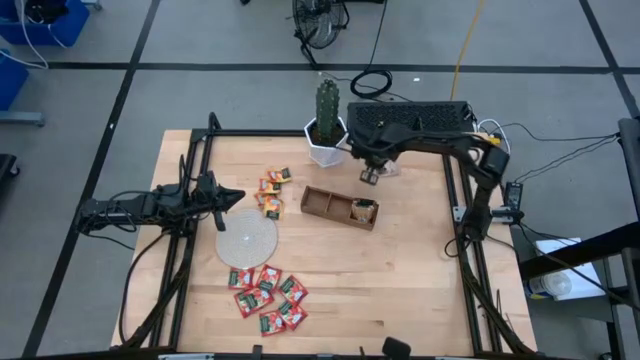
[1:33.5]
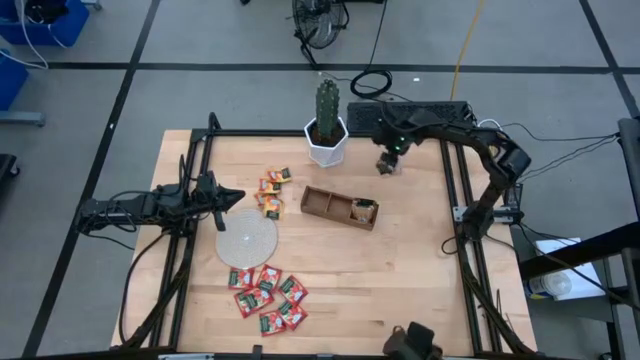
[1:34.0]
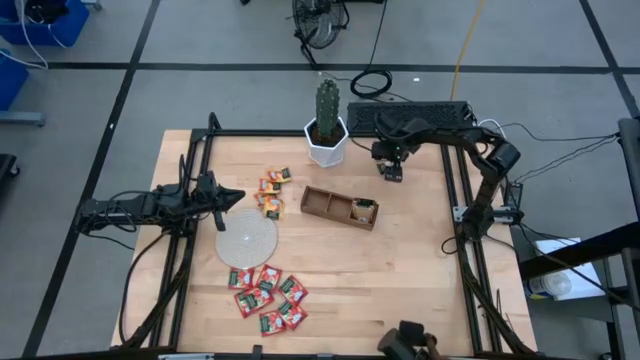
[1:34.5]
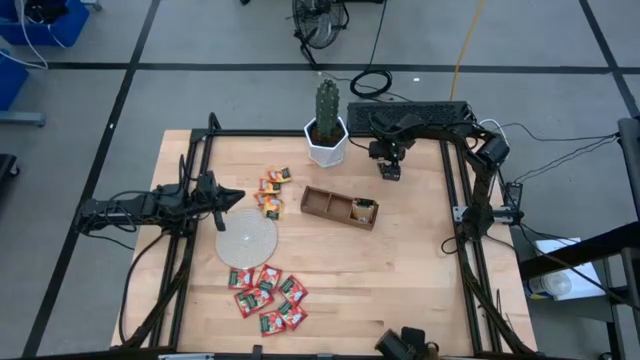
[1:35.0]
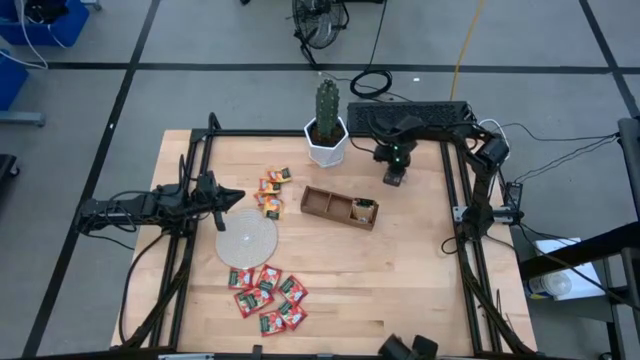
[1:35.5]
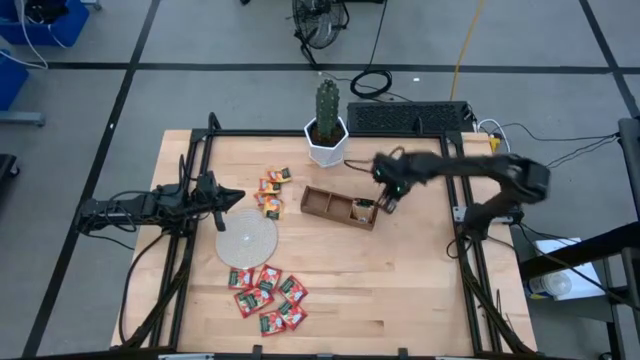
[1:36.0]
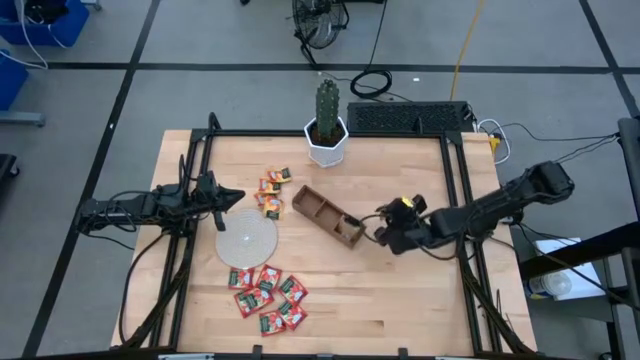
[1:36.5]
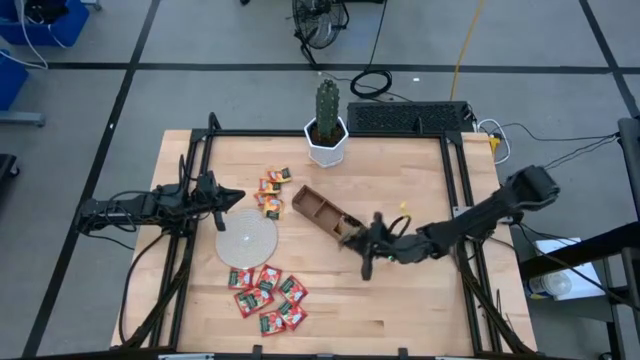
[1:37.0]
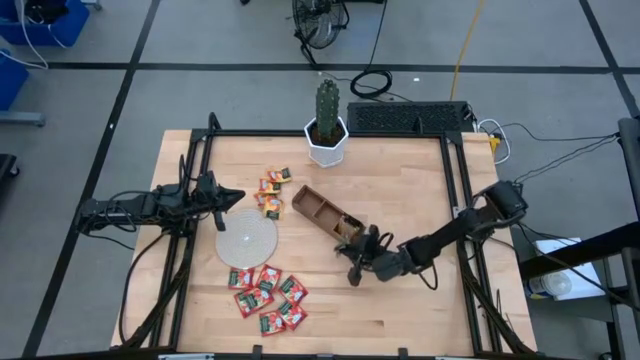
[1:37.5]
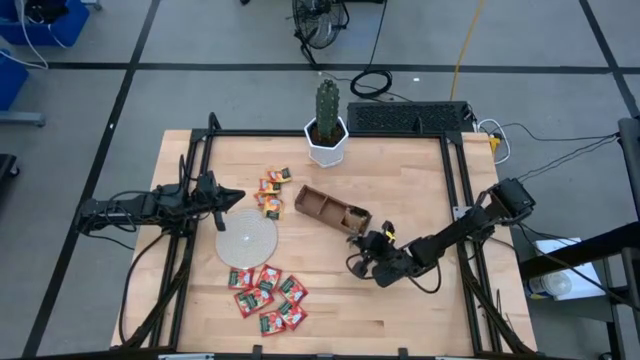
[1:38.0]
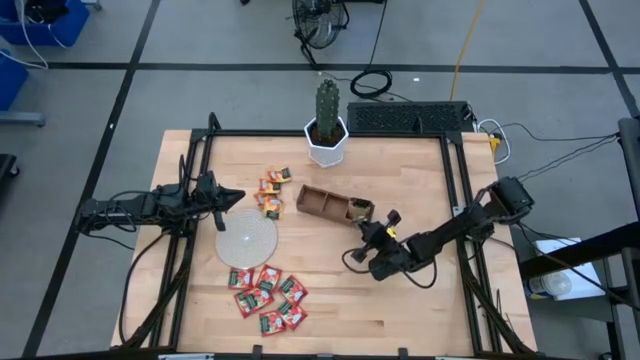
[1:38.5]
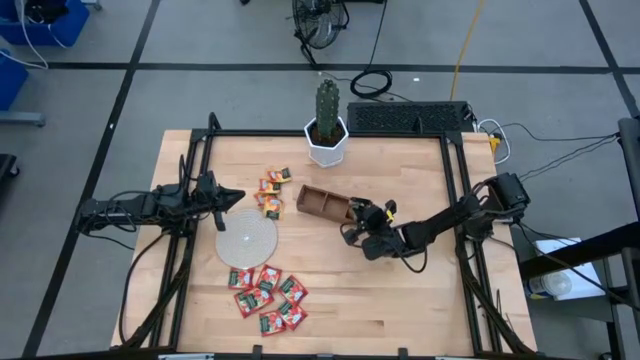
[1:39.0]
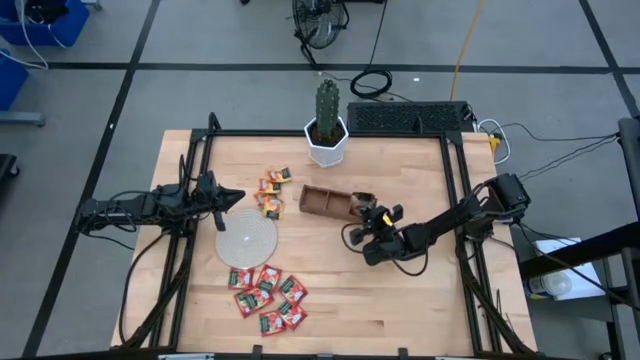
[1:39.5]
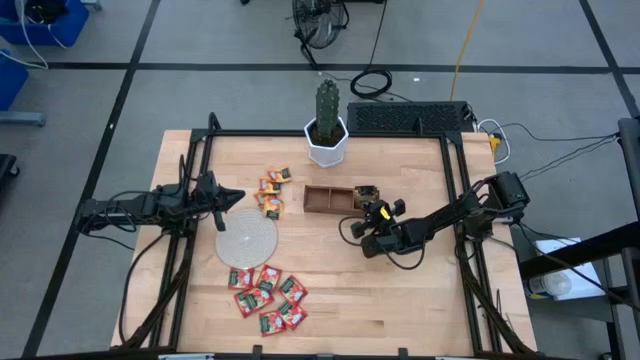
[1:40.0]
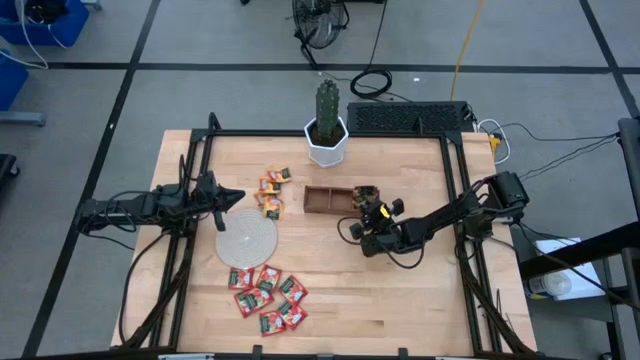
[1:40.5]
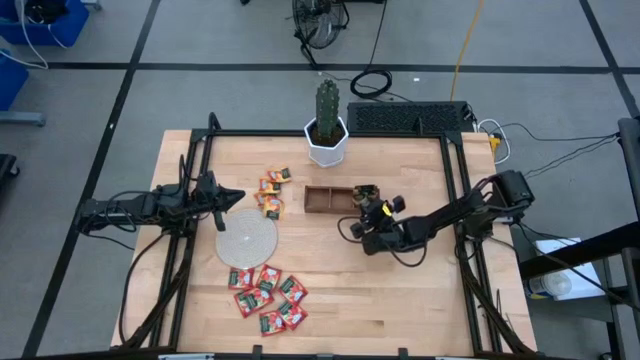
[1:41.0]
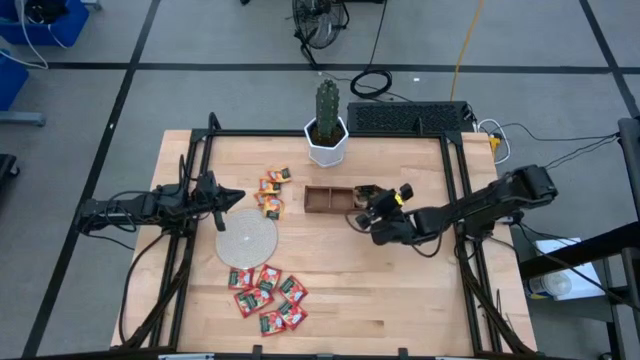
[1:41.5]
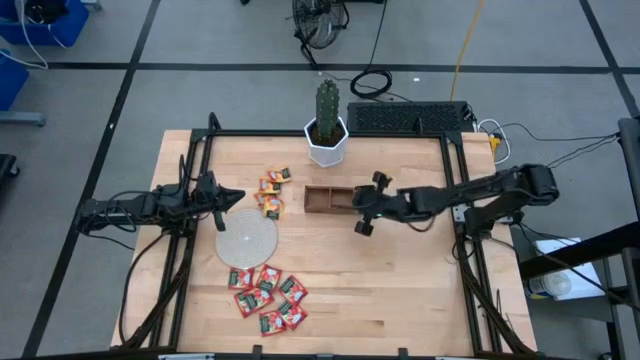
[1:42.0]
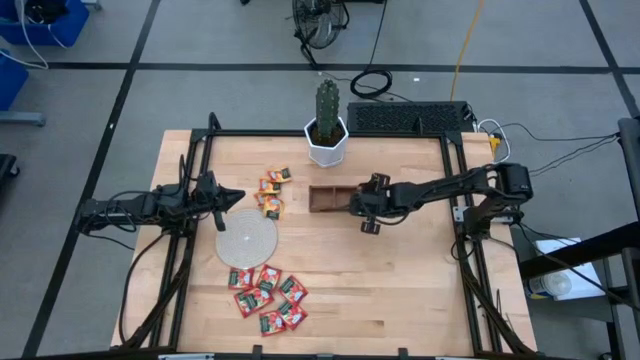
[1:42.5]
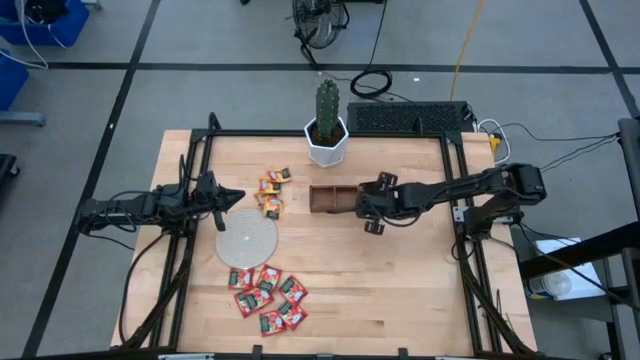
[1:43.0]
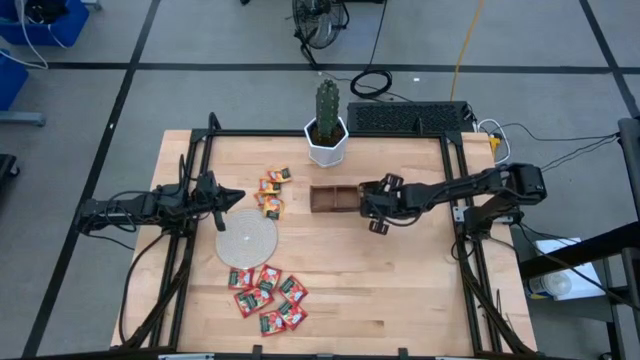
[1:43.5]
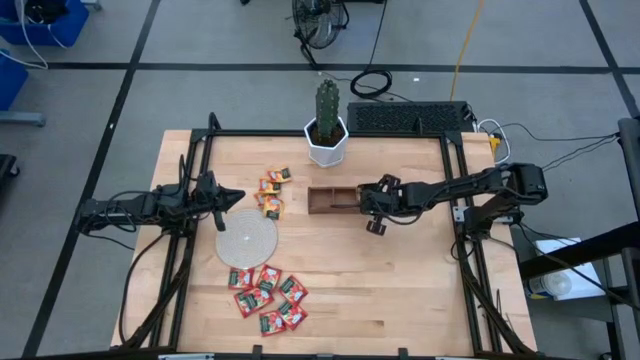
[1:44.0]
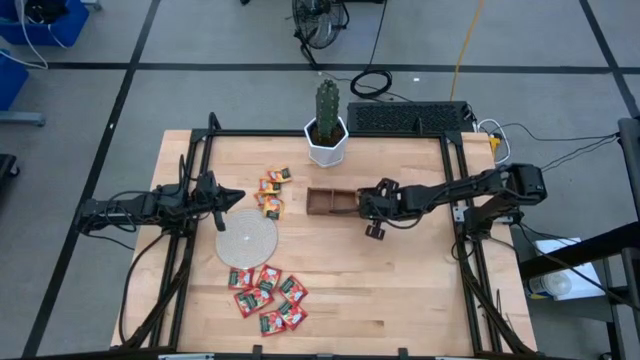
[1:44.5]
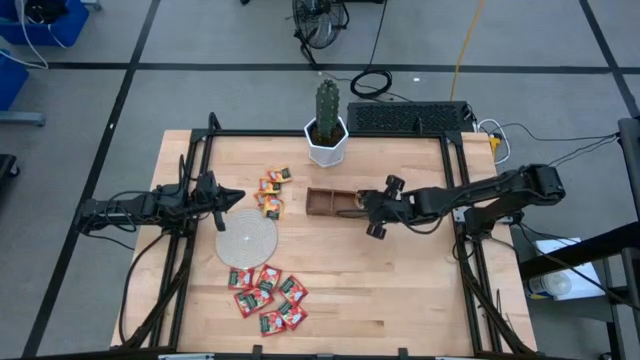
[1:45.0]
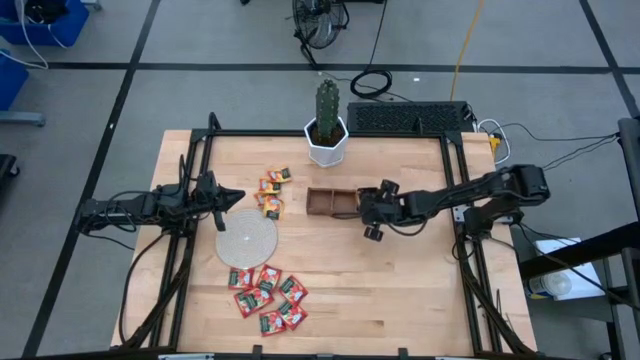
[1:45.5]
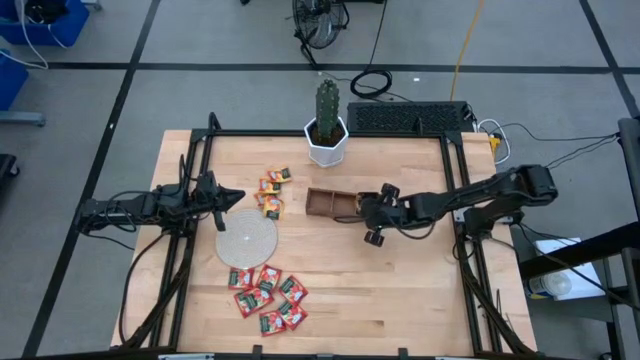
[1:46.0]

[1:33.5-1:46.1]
Task: Pick & Place Tea
Put the brown tea bag into the right section of the wooden organizer

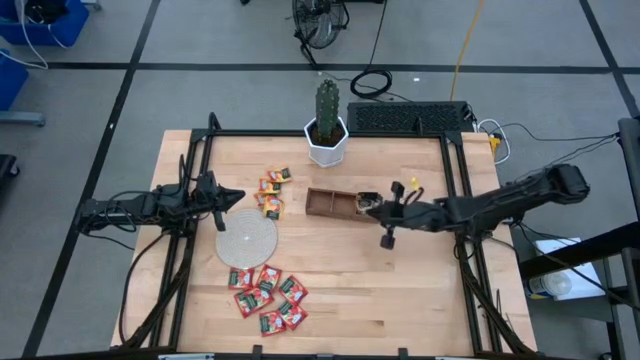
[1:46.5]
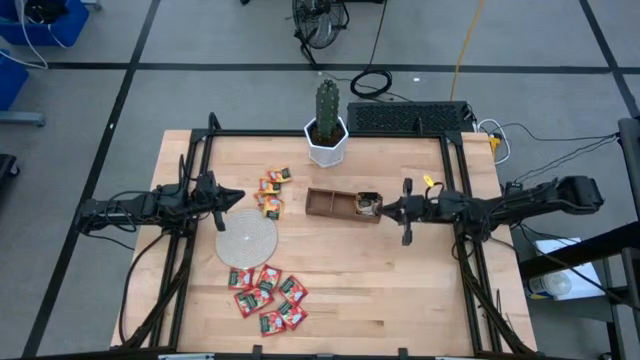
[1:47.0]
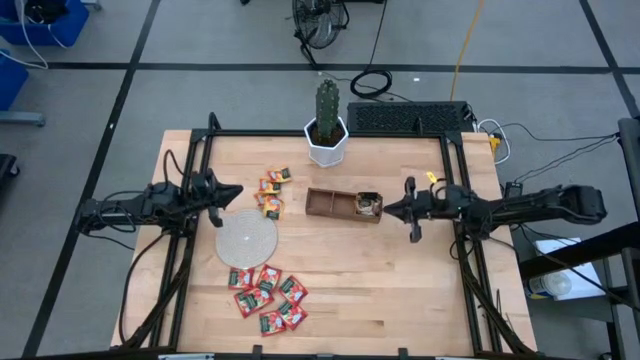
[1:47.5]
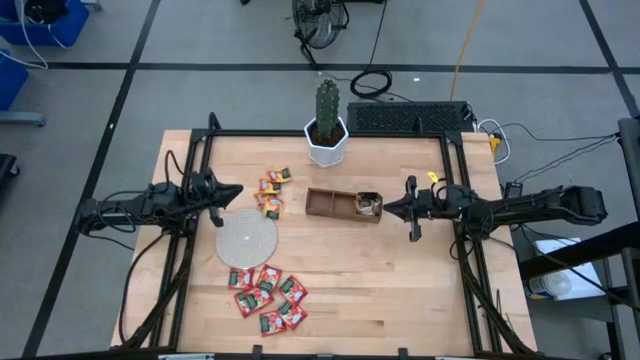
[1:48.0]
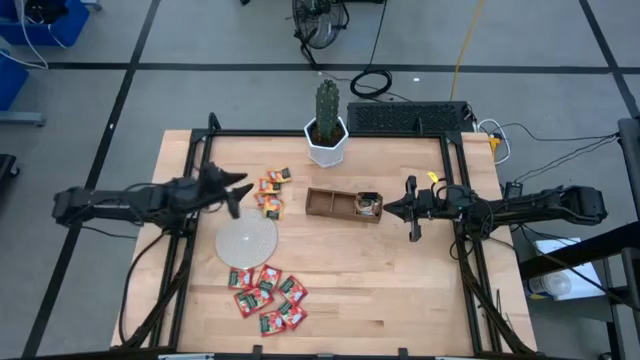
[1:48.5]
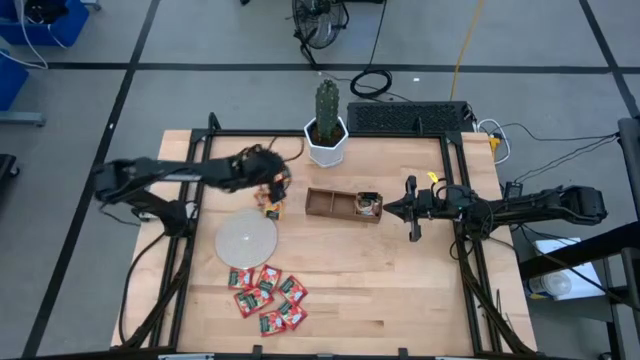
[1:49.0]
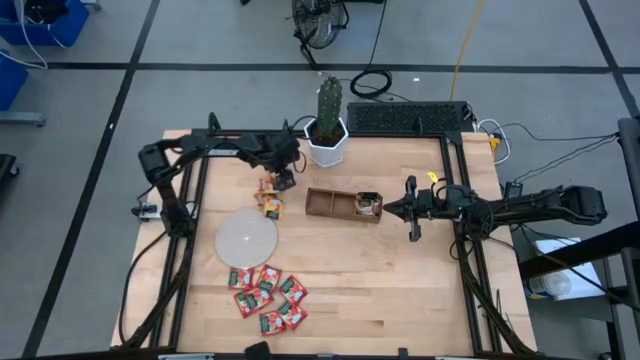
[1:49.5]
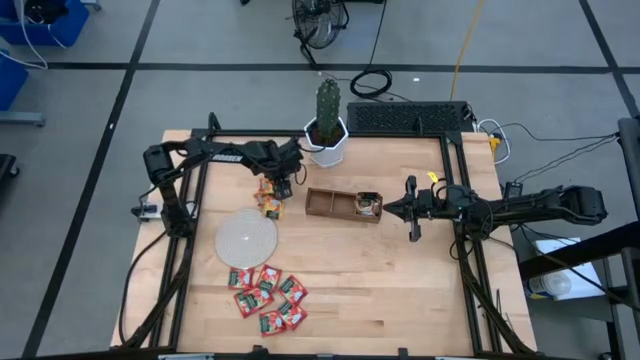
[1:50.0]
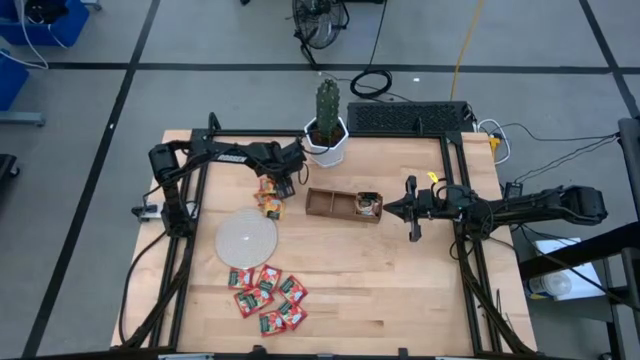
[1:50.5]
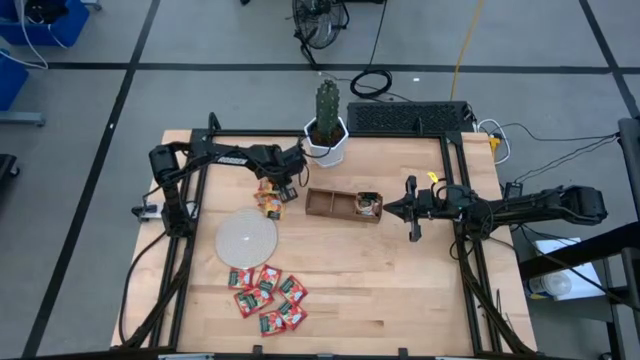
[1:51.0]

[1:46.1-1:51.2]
Put the yellow tea bag into the middle section of the wooden organizer

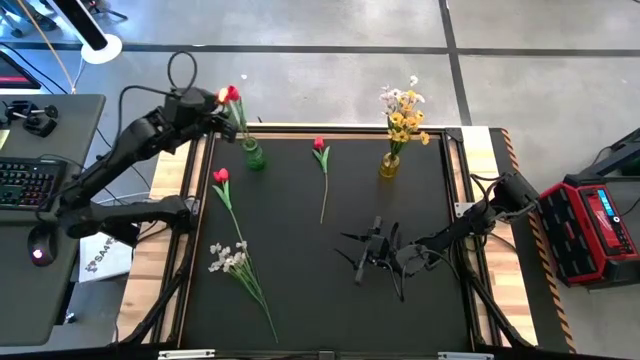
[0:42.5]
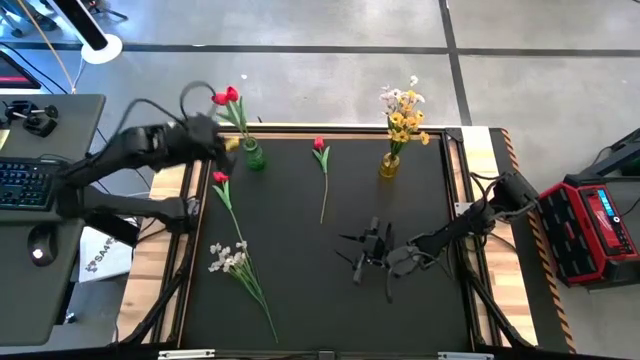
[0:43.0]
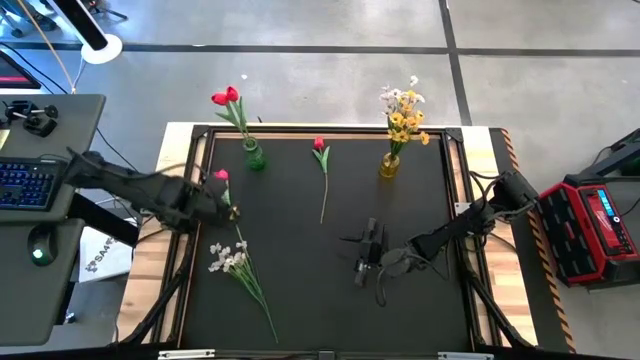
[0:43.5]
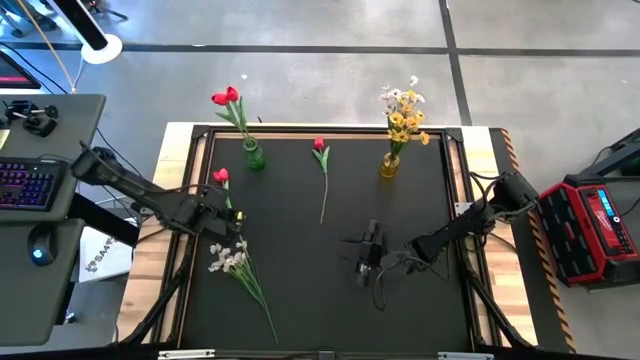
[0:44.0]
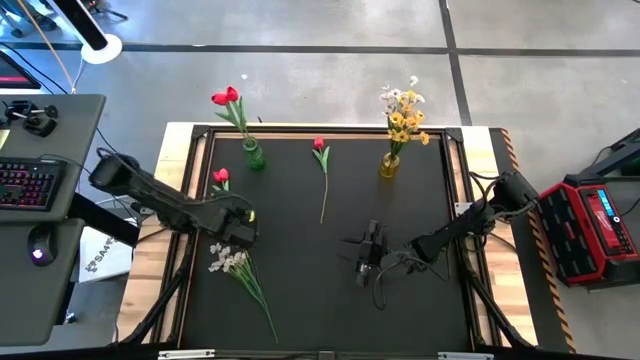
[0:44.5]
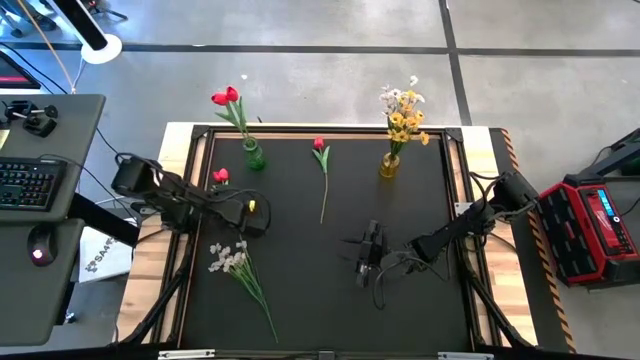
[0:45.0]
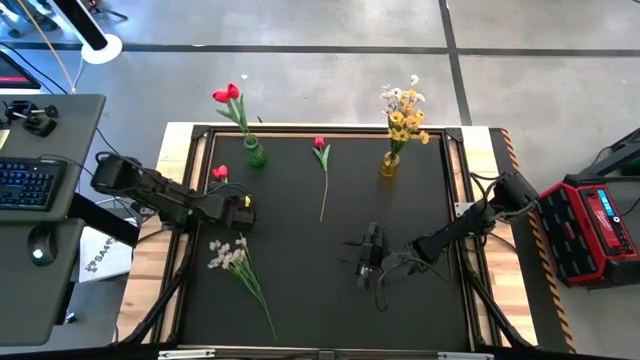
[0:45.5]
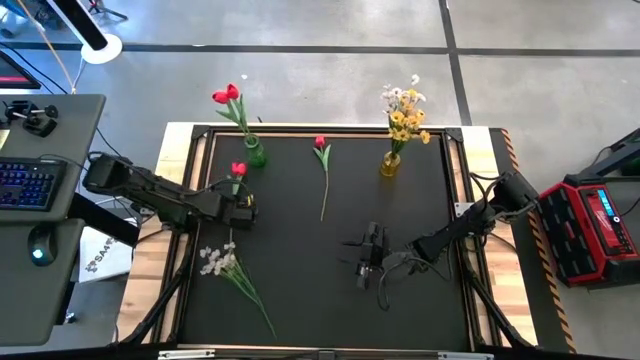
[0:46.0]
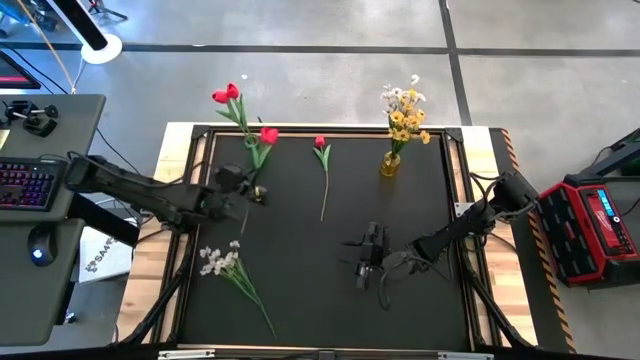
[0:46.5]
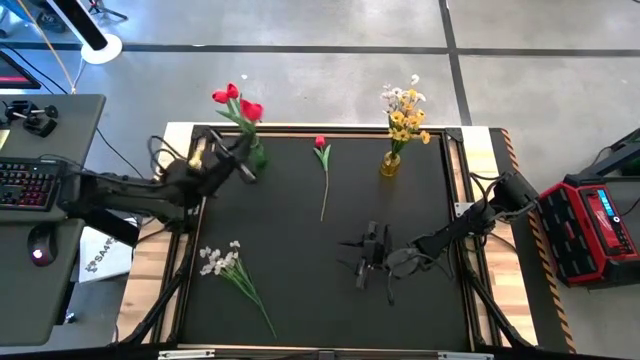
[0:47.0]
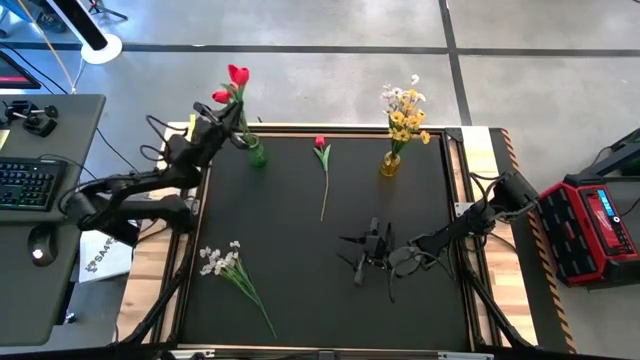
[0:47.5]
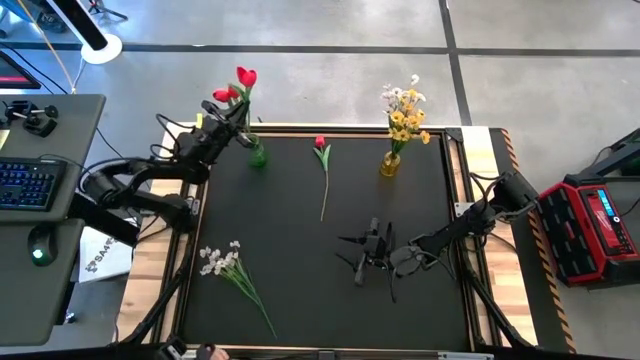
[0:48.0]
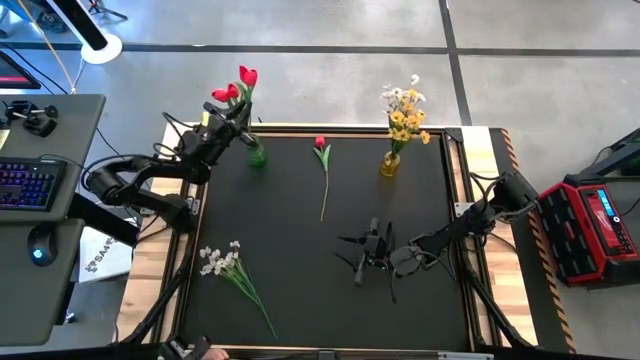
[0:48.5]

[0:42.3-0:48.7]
Task: Sort flowers into vase by color
Put the red tulip into the green flower vase
